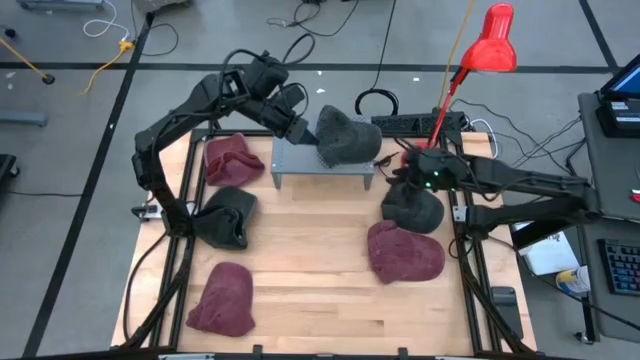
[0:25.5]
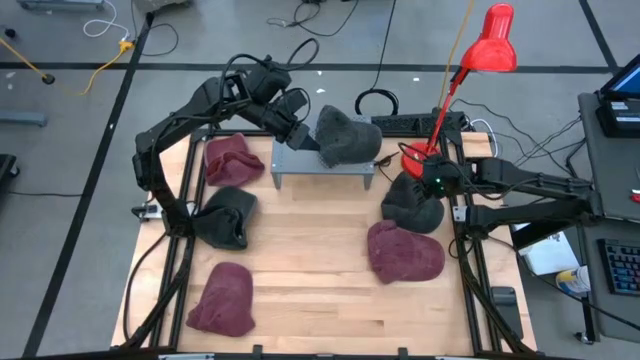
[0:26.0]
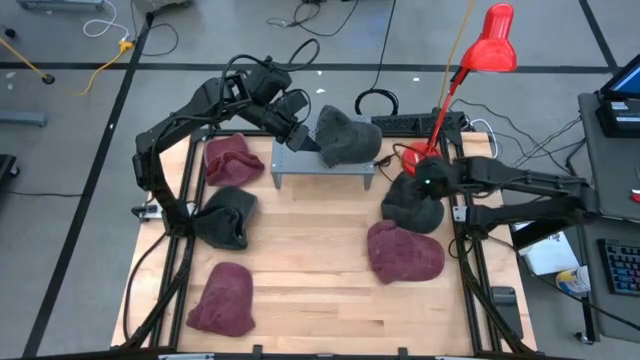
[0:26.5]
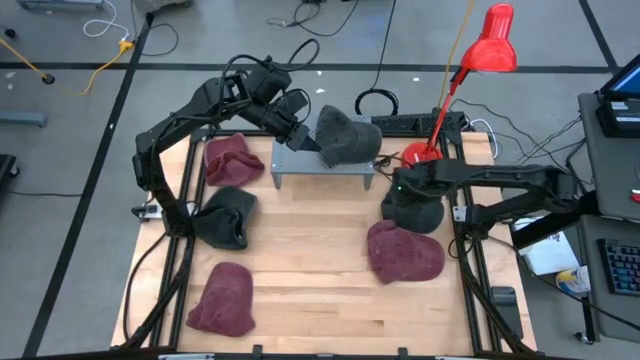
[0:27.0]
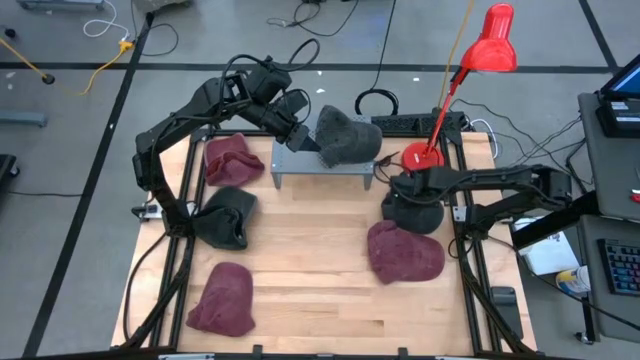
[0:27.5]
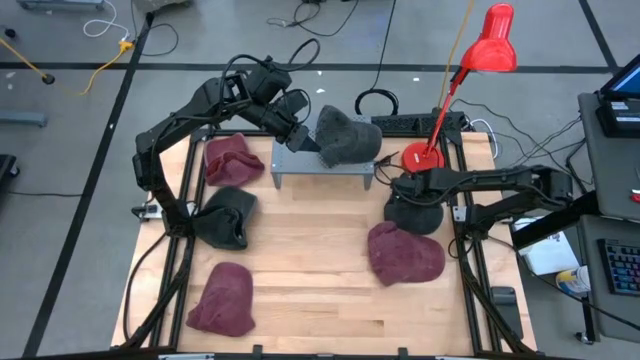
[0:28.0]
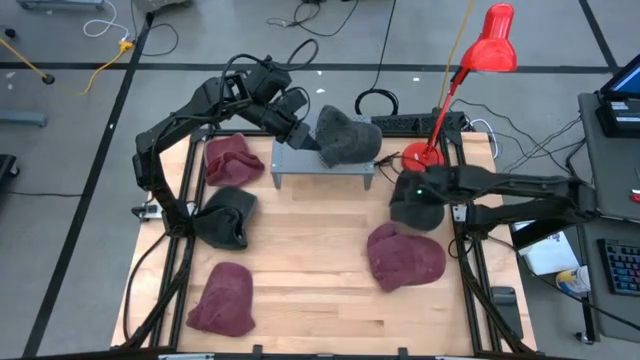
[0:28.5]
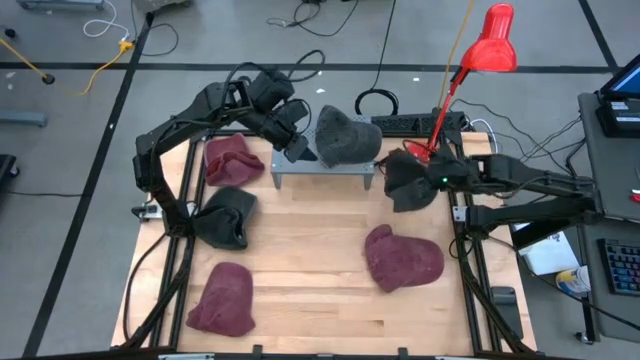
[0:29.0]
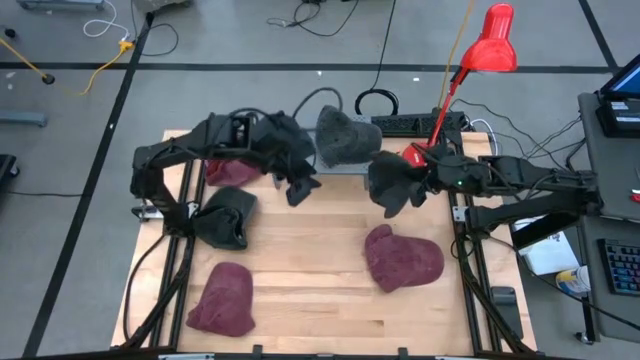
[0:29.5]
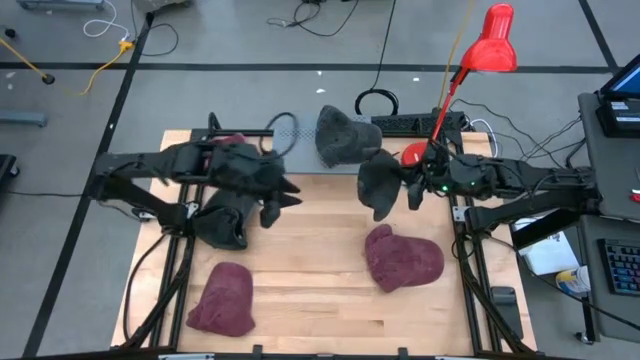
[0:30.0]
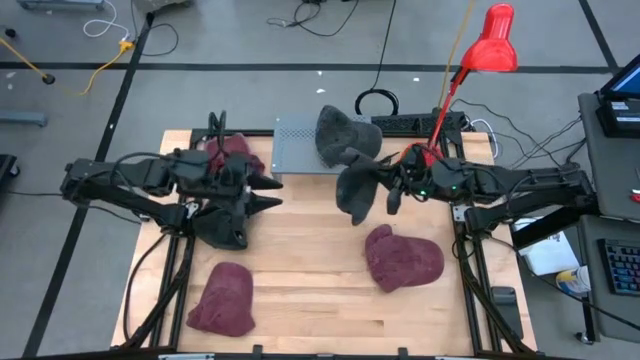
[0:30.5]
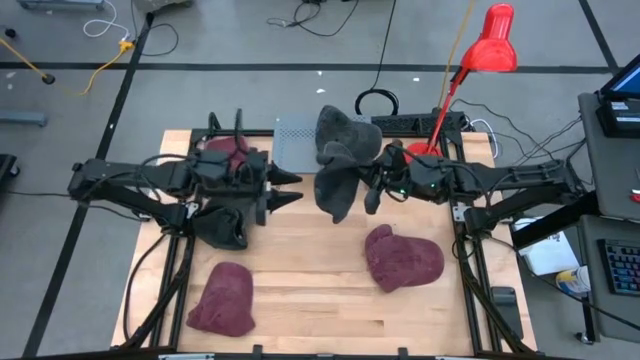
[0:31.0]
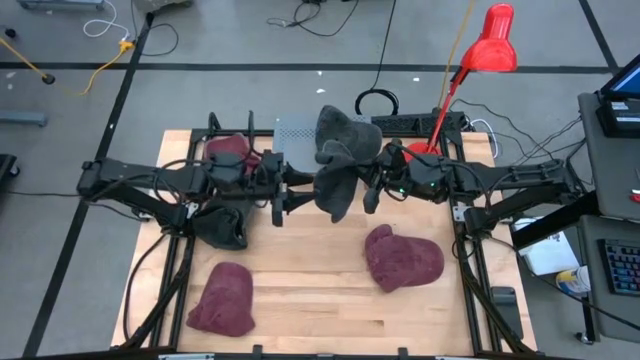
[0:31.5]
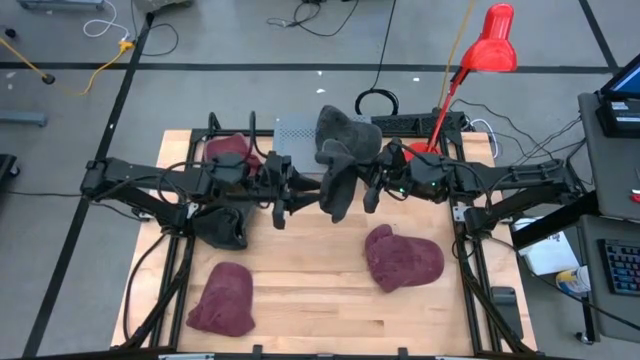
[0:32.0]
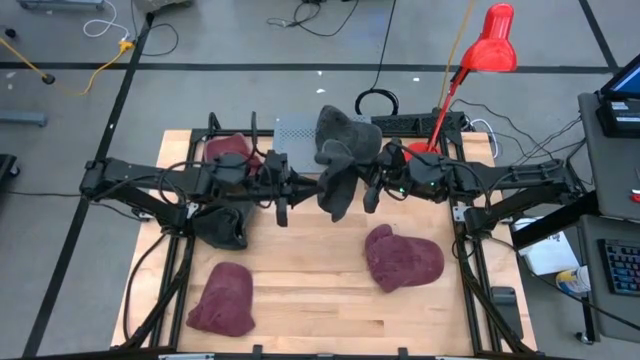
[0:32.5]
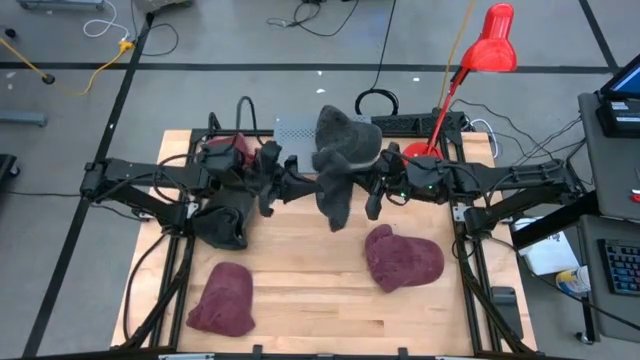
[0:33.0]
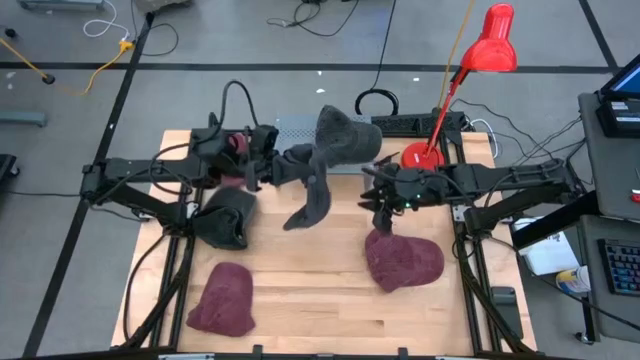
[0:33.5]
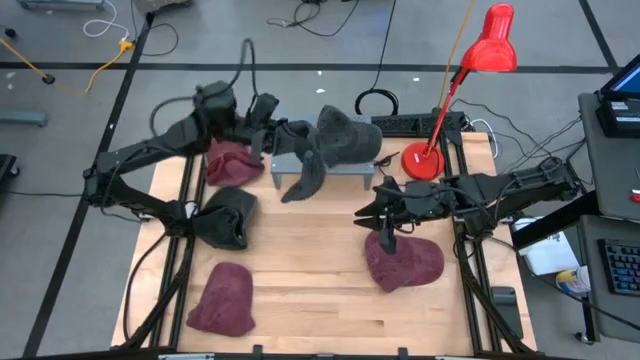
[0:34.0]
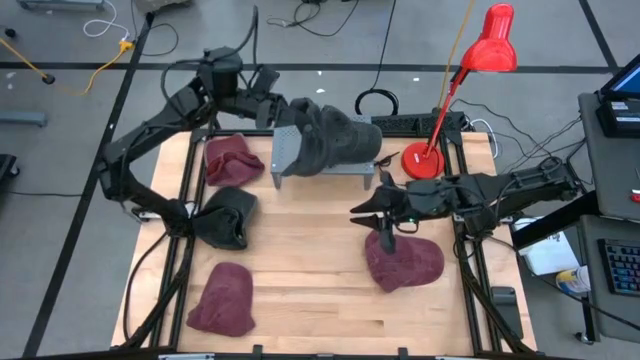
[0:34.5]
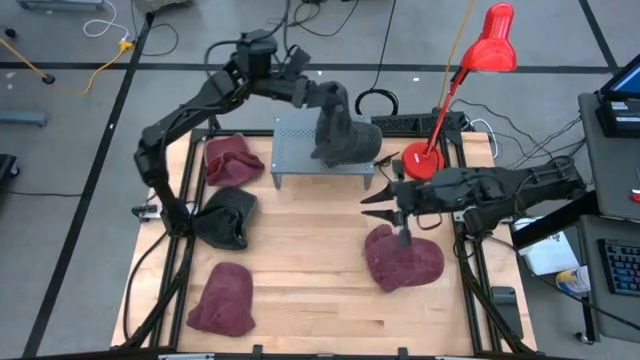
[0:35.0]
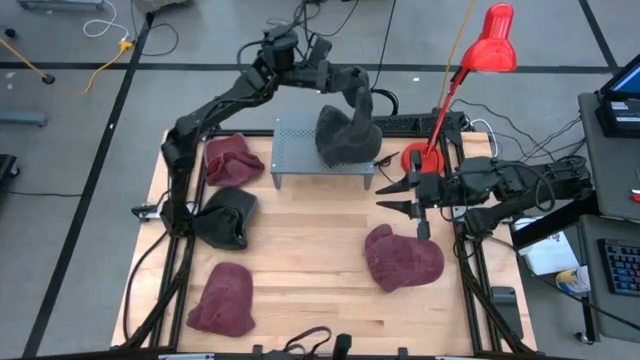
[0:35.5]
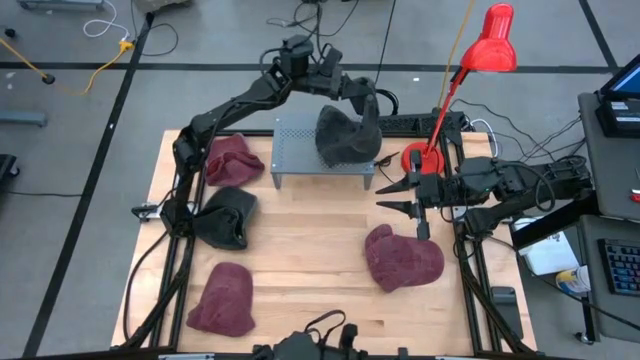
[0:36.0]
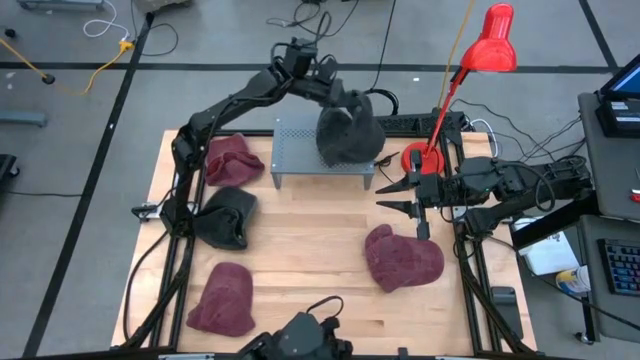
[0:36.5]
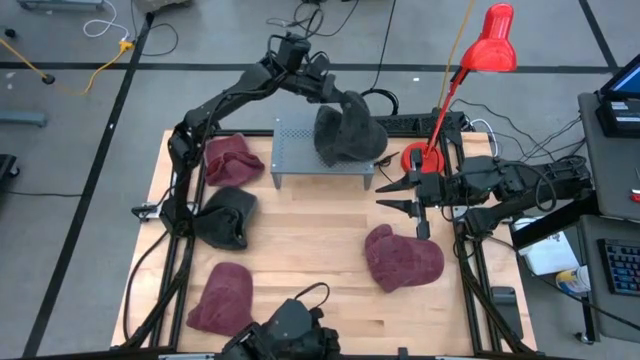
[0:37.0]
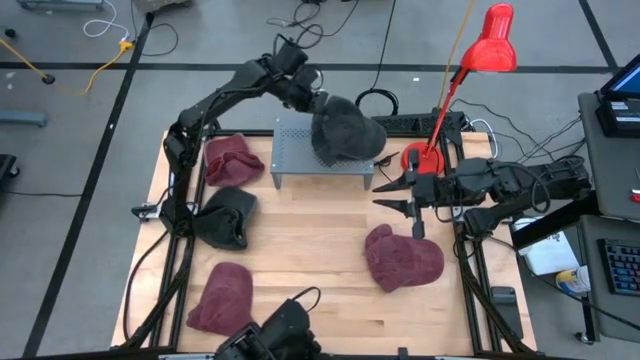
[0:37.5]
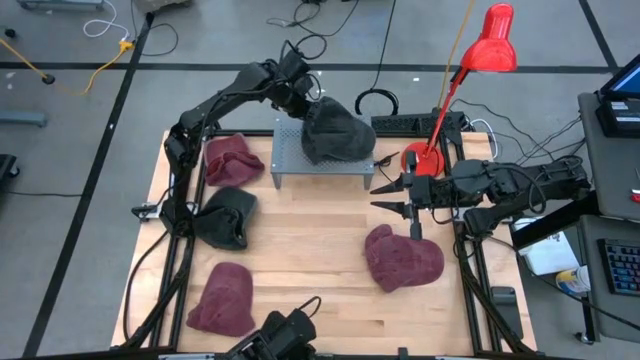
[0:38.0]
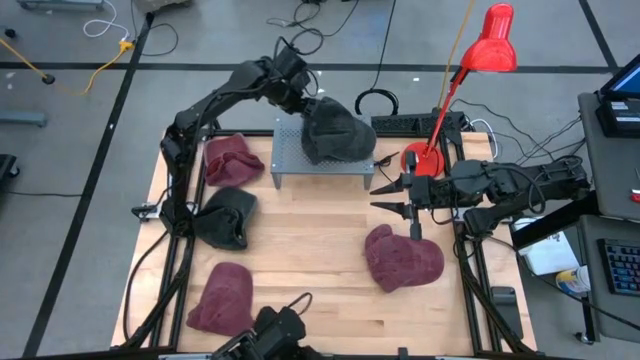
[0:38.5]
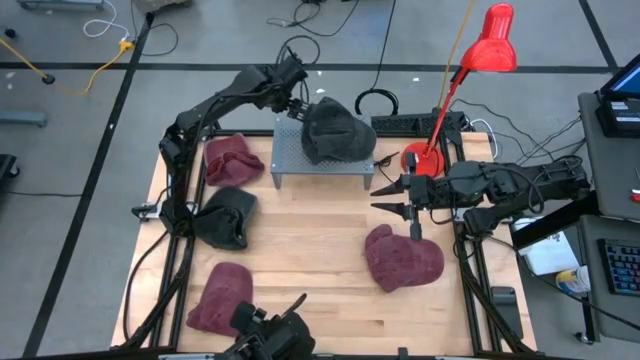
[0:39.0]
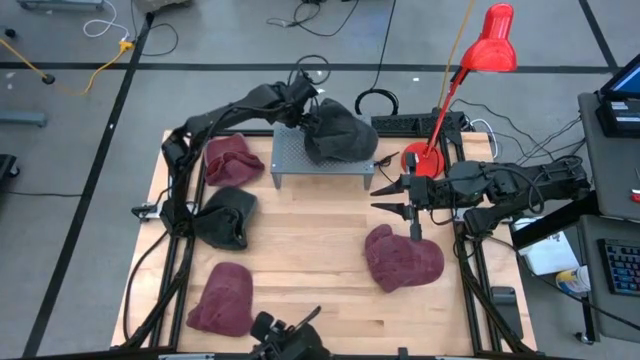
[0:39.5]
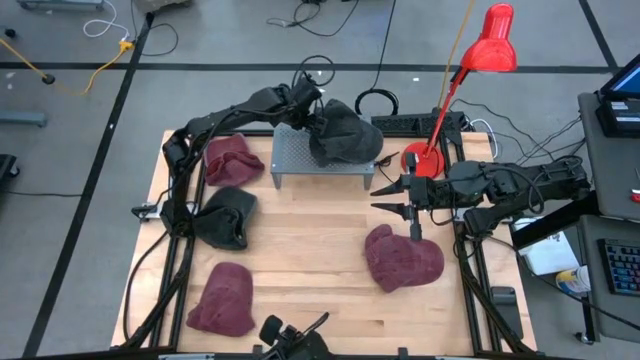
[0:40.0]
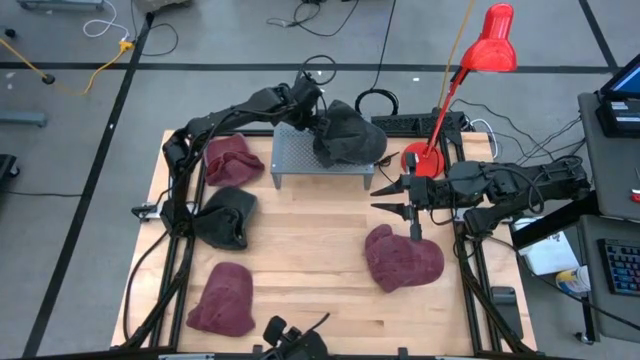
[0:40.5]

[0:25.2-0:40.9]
Task: Pick & Place hat
Stack the right black cap on the black cap on the shelf

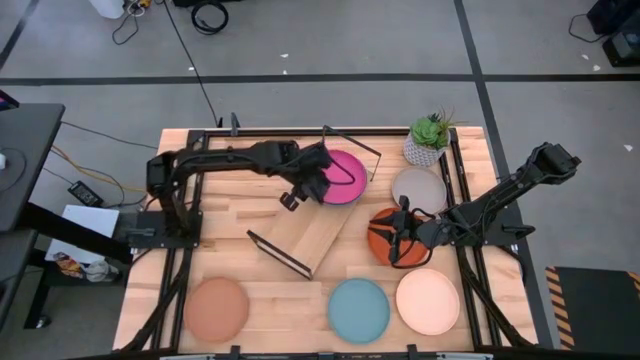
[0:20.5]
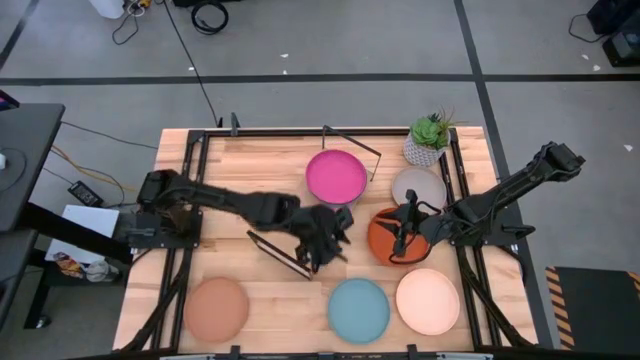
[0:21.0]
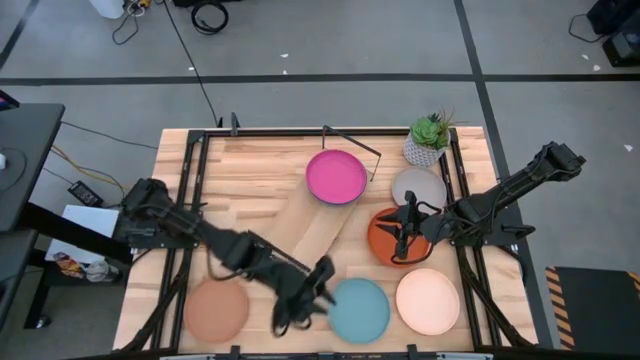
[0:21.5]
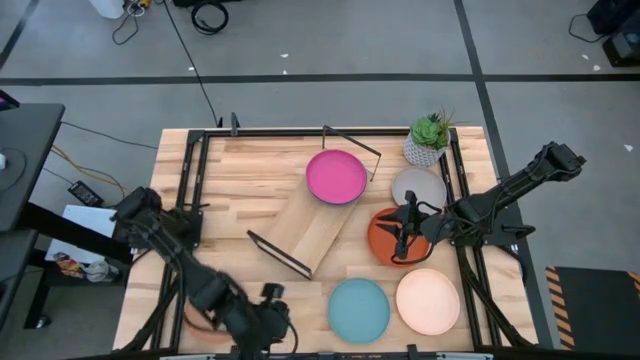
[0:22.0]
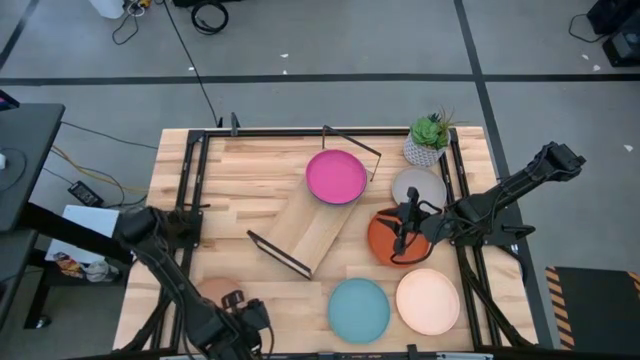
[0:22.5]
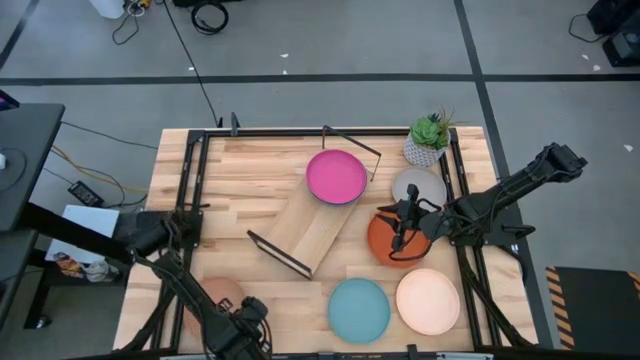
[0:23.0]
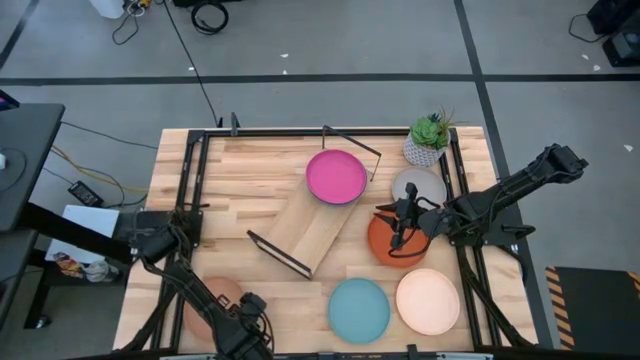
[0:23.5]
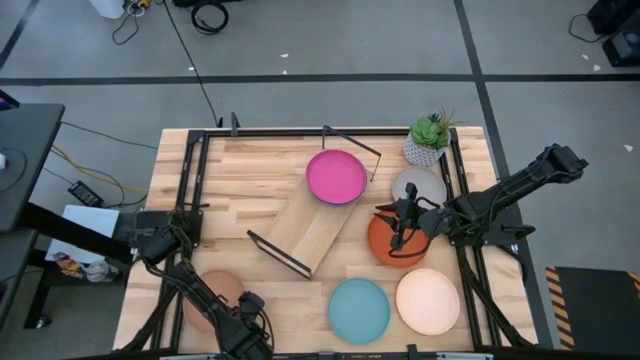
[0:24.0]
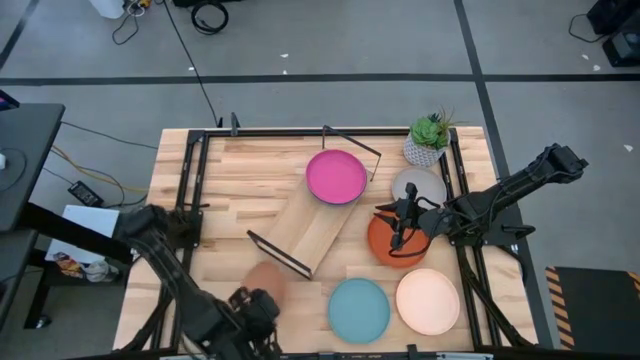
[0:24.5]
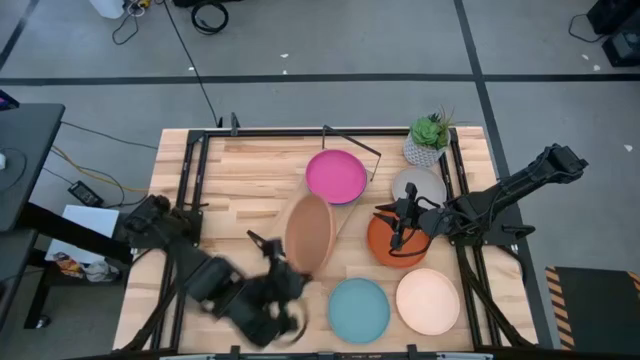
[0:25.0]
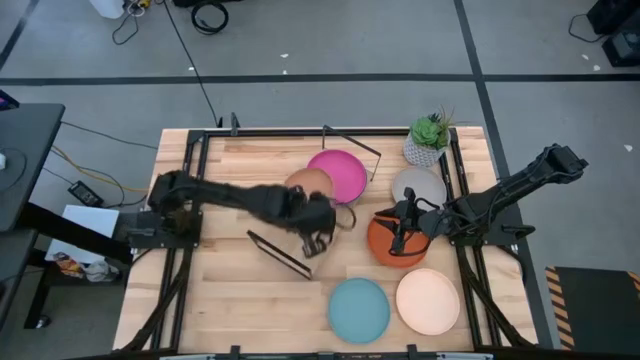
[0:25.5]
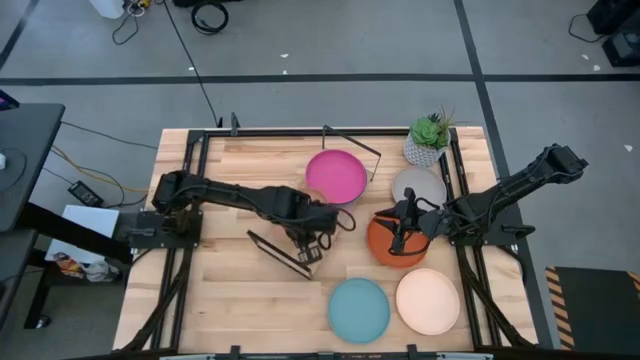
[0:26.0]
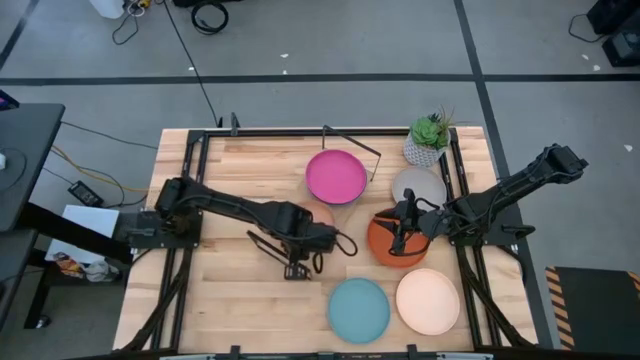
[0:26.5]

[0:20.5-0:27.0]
Task: Place and stack plates onto a shelf
Put the brown plate on the shelf
